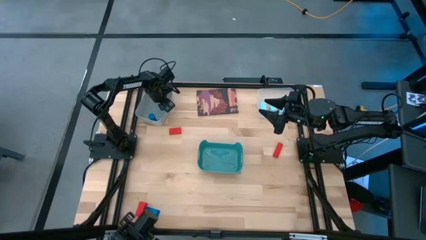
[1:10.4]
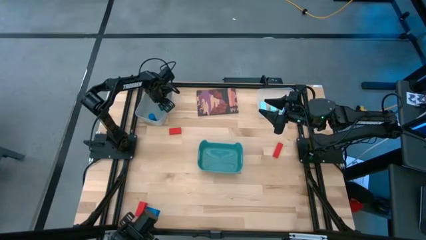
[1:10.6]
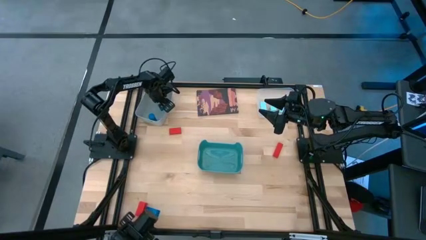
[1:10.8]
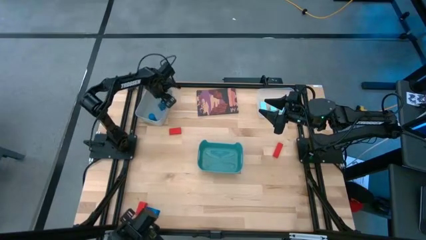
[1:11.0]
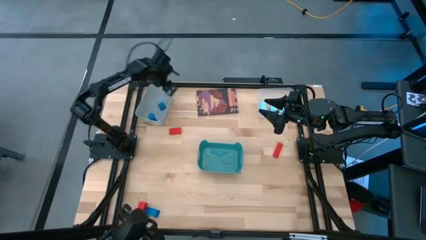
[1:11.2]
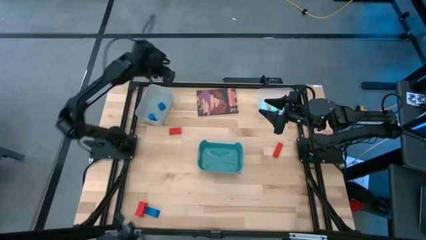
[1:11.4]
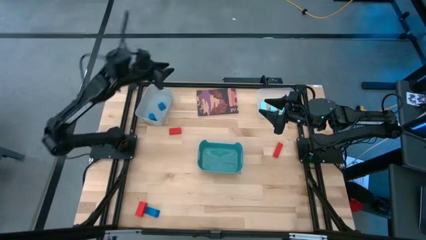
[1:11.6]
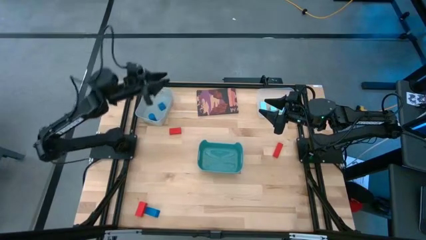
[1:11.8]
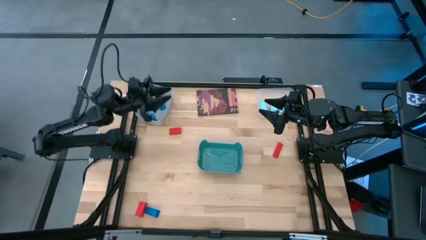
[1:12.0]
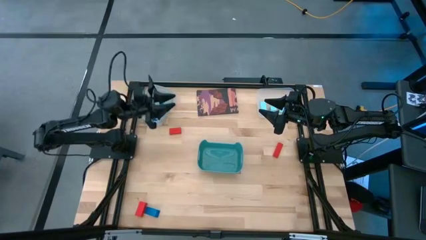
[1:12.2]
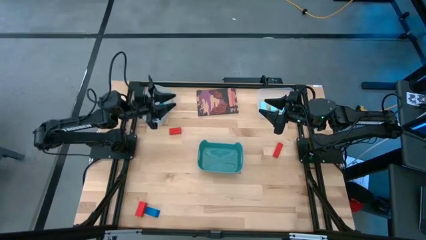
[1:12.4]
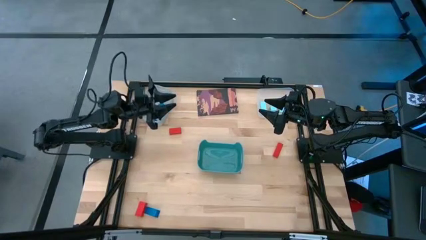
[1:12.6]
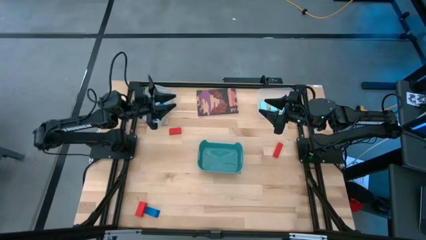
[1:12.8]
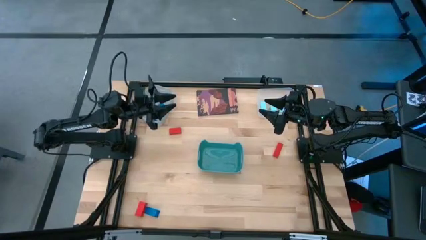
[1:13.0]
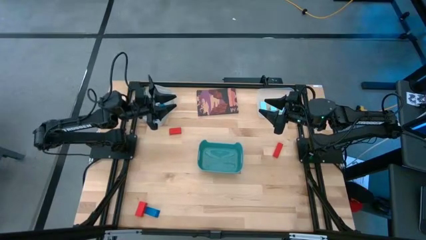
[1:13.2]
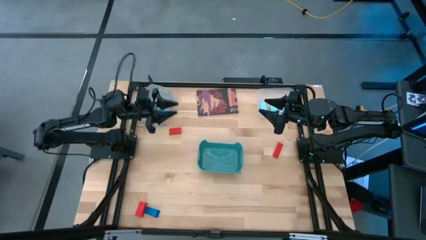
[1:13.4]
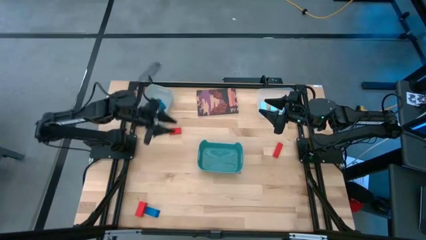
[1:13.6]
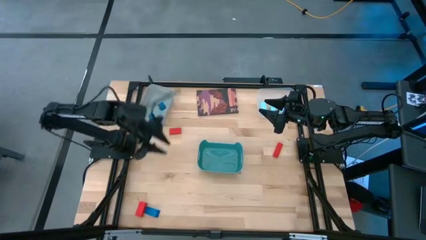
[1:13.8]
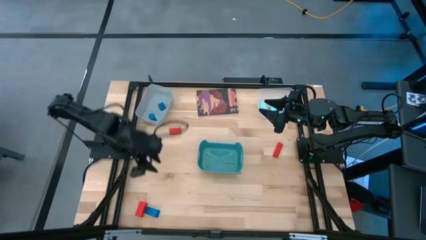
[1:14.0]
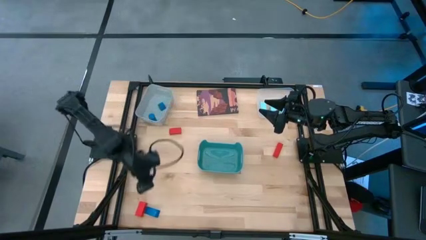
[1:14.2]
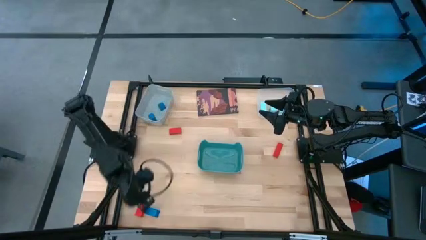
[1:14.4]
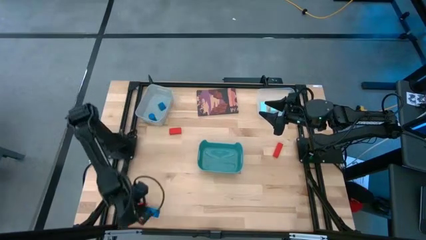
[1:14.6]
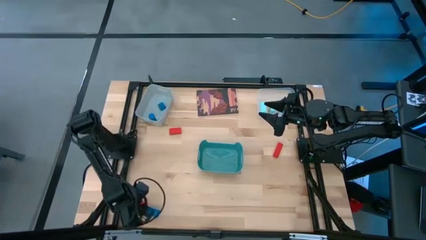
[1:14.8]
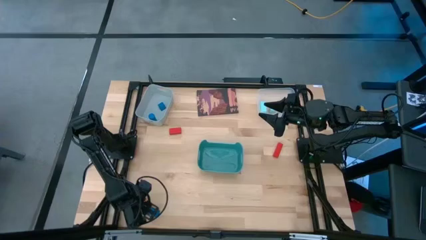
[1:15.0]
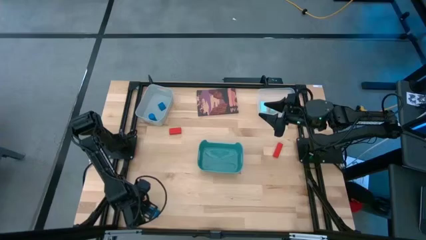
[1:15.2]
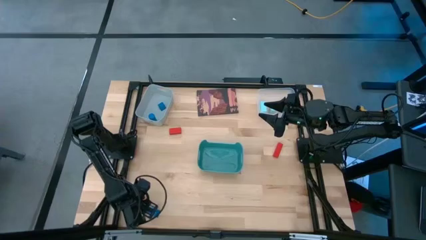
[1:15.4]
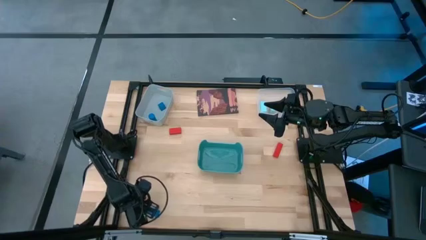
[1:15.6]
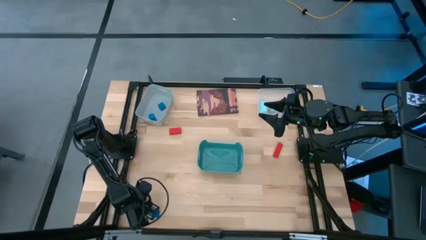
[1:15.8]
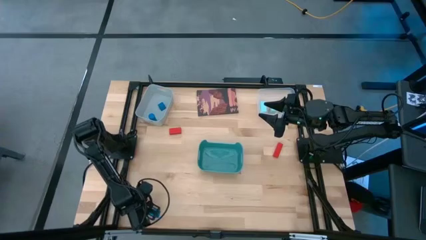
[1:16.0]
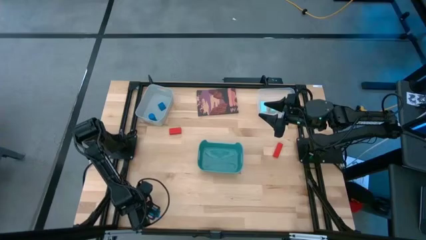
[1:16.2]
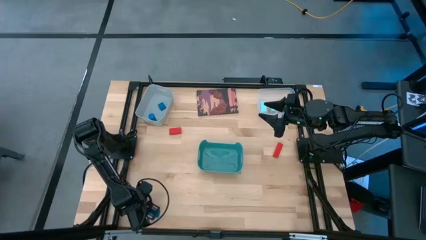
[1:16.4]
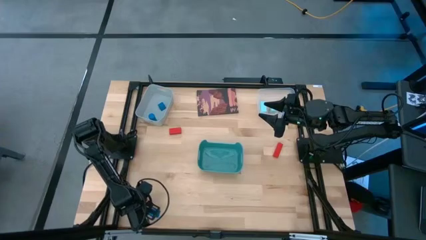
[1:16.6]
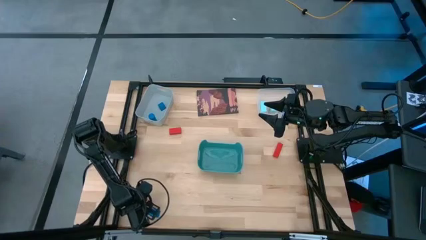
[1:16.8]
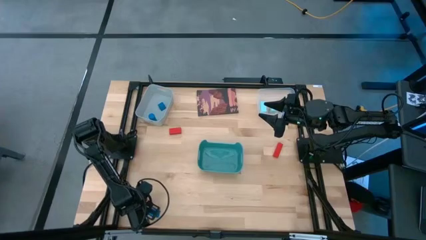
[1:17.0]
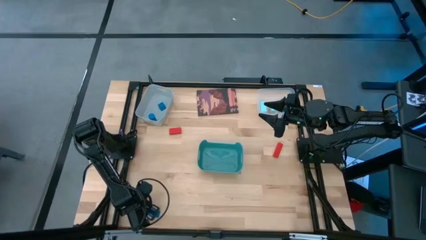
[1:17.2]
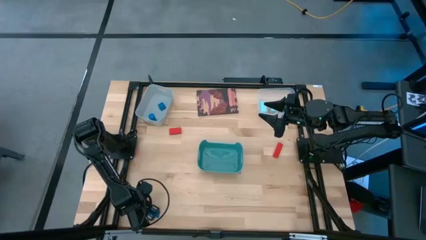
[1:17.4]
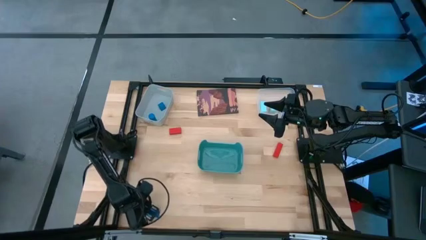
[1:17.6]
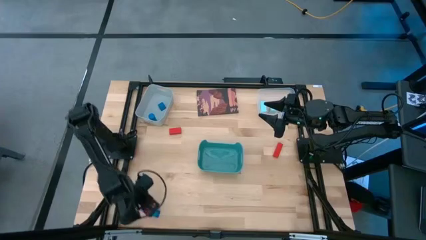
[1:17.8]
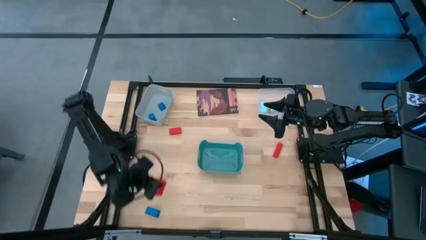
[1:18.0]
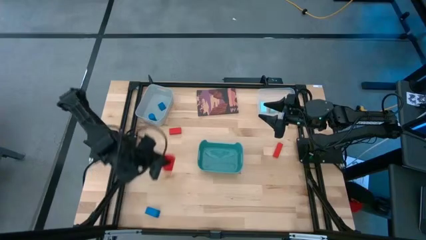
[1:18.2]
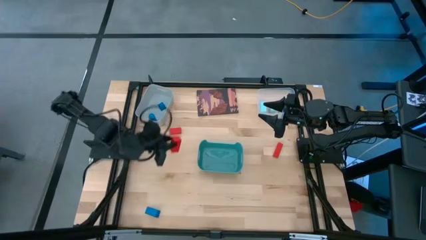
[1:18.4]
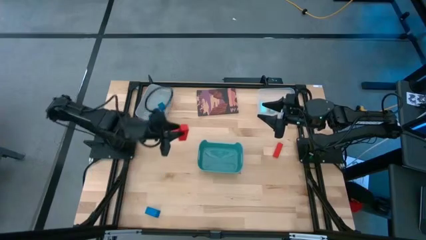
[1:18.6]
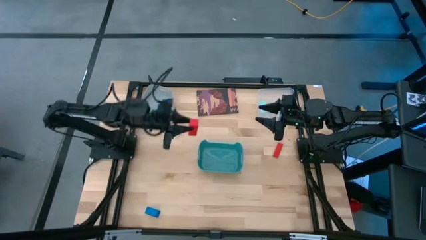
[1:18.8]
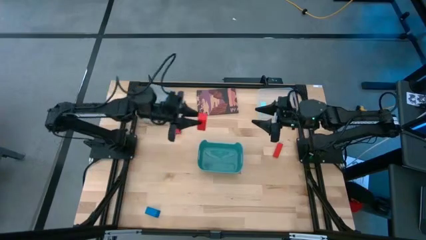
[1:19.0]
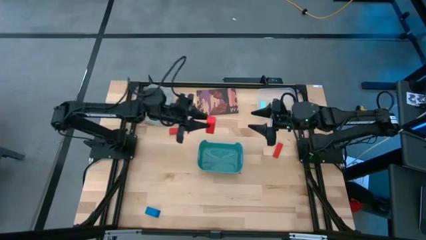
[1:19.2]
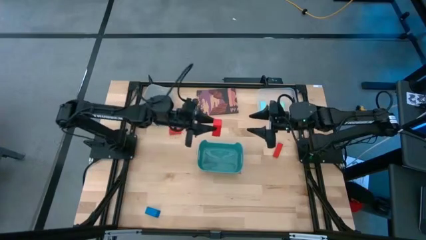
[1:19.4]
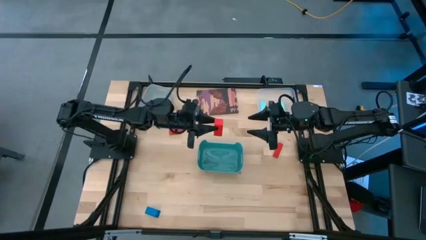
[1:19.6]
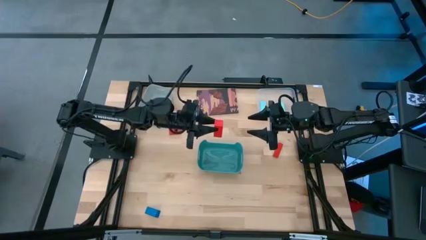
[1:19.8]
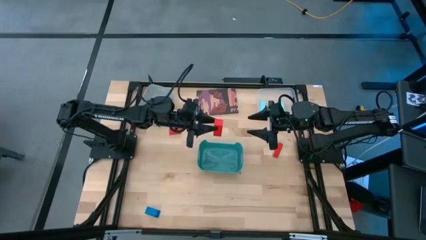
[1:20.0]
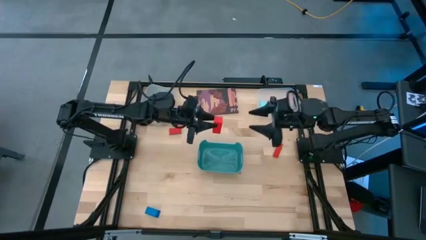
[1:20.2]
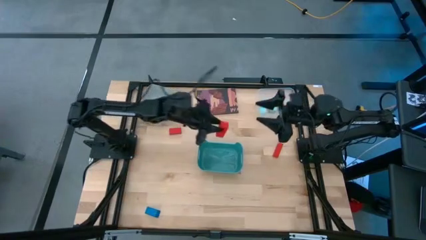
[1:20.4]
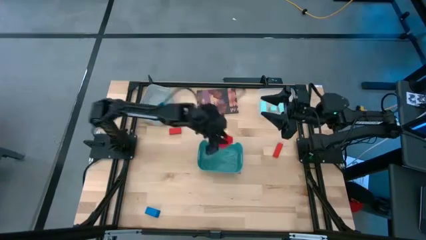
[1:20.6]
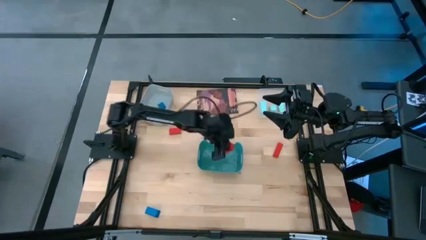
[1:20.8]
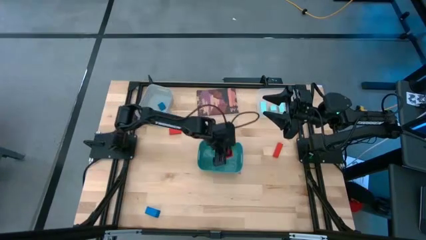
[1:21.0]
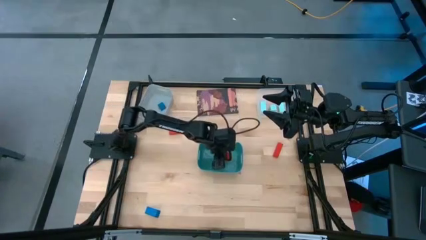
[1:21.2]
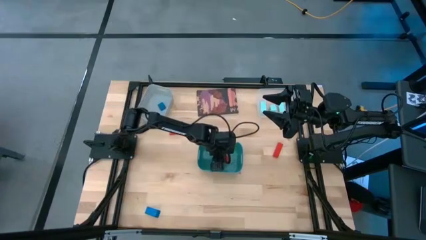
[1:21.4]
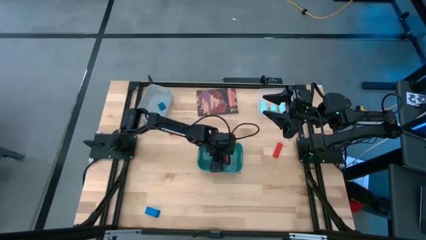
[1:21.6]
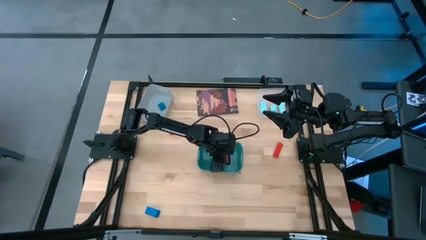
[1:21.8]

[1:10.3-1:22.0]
Task: Sort & place blocks by color
Put the bottom square orange block into the blue green bin

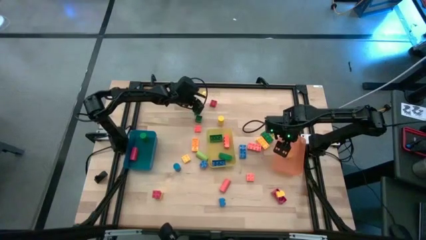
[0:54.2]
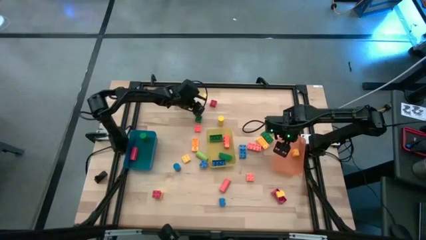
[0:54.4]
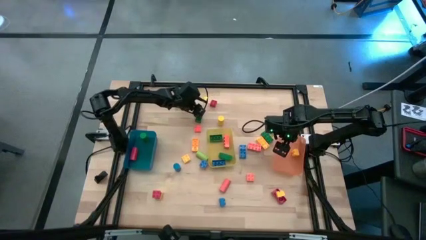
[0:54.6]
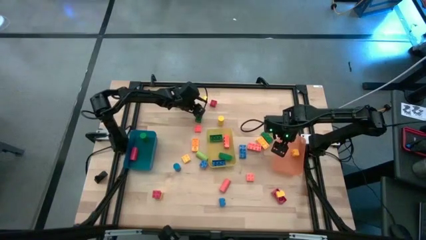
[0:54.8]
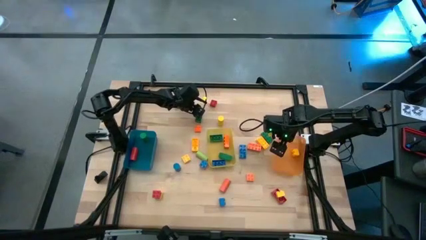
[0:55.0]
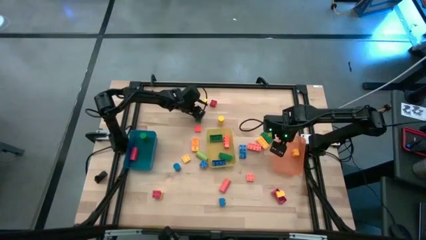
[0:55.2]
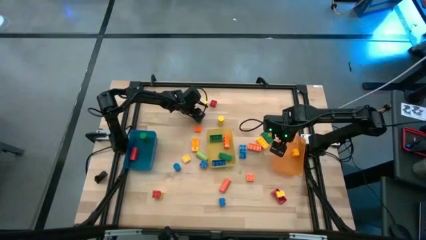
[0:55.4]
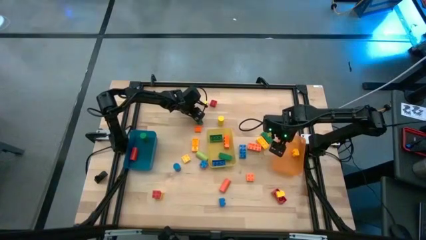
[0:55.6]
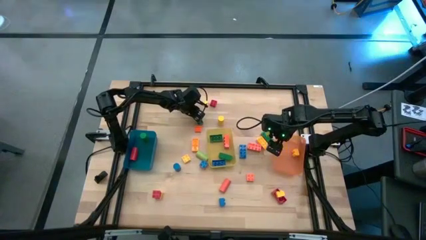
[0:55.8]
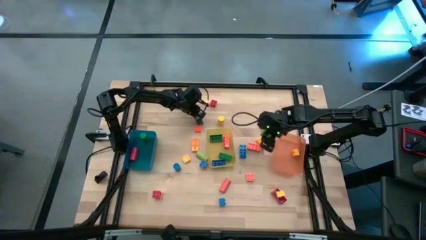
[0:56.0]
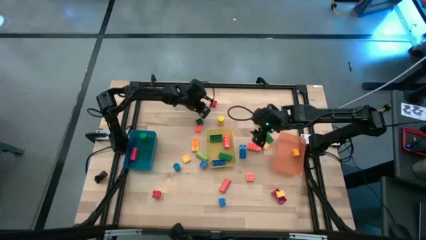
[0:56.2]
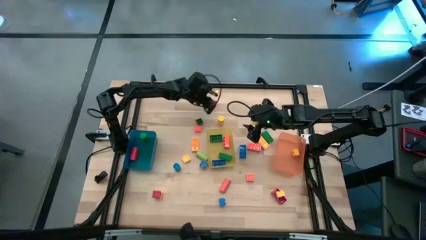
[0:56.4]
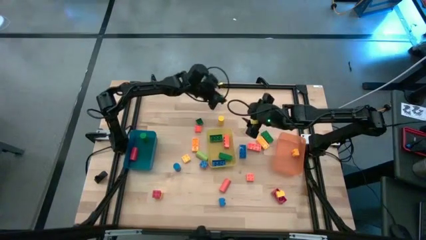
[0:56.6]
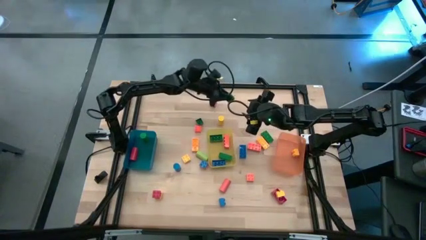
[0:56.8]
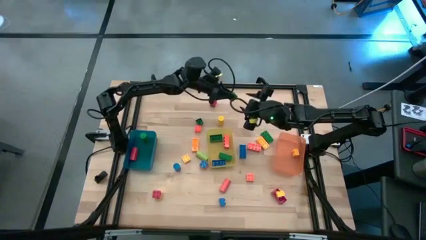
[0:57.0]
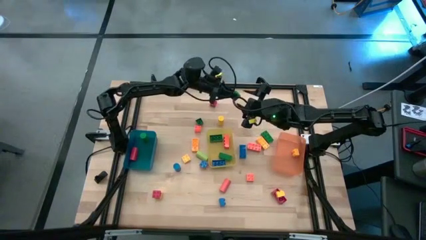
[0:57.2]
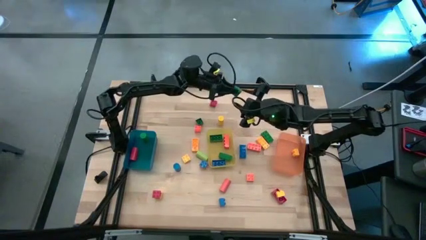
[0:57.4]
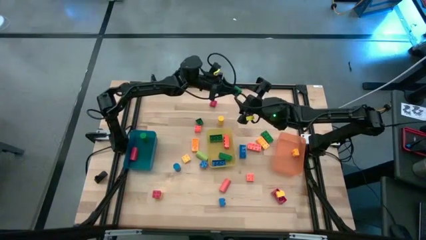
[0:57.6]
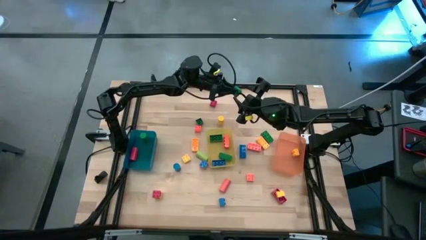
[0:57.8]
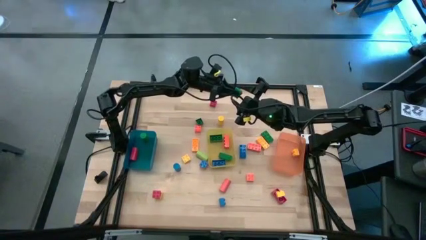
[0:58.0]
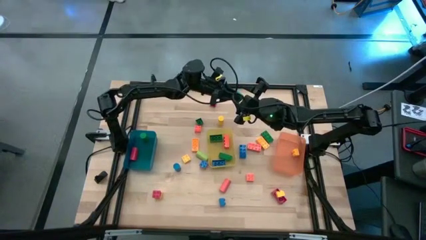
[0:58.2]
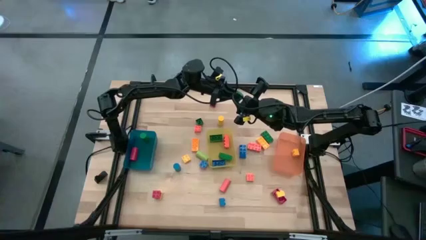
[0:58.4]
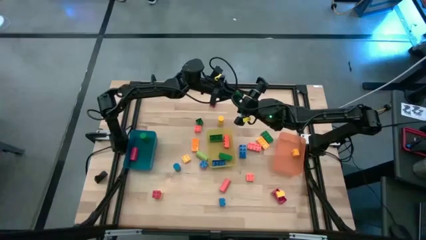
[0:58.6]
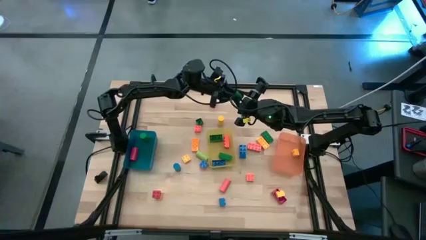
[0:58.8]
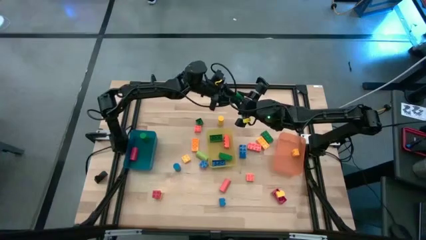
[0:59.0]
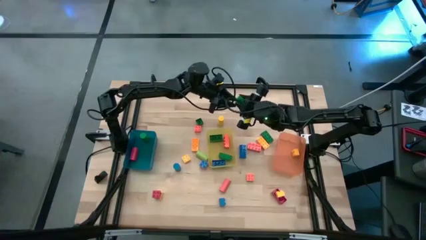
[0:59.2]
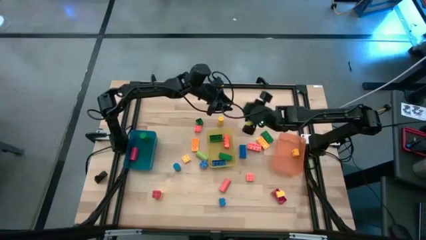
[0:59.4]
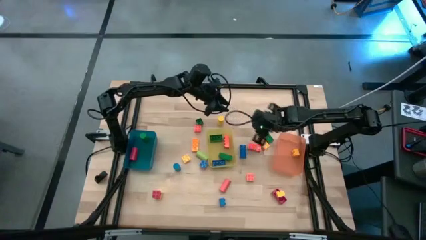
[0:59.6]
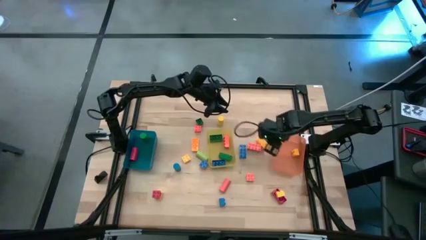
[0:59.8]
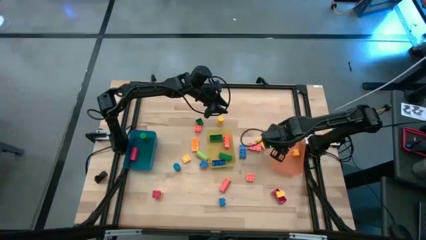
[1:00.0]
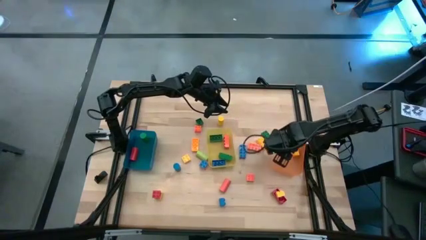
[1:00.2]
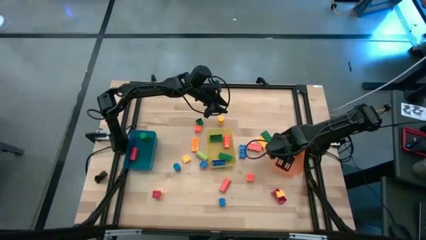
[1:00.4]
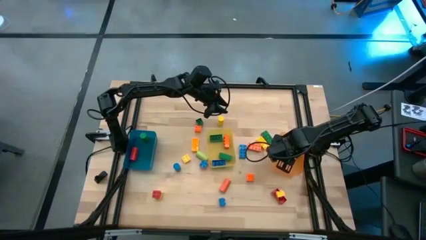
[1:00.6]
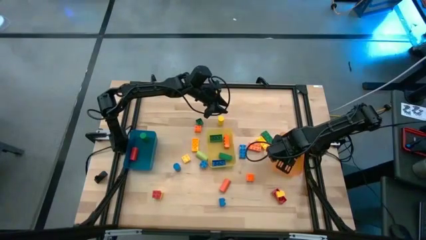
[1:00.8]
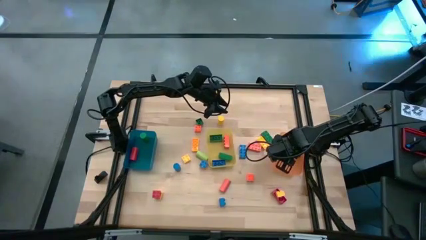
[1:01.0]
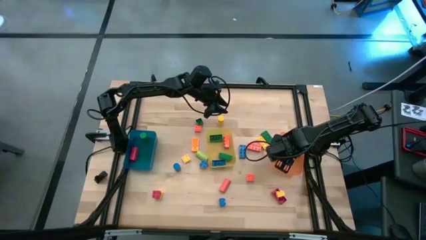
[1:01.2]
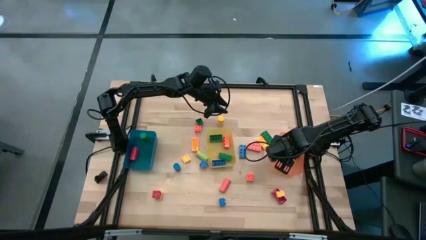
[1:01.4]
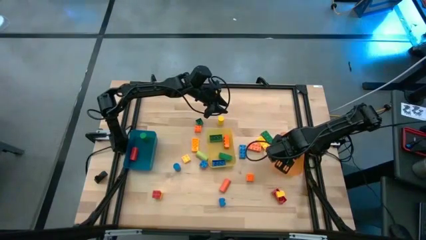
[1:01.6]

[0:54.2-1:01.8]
Task: Sort blocks by size
Put the green 4 stud game piece into the orange bin
